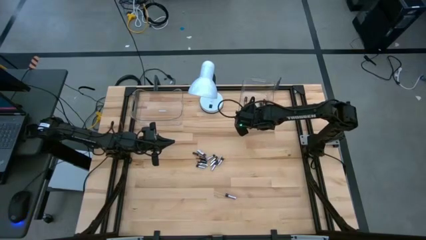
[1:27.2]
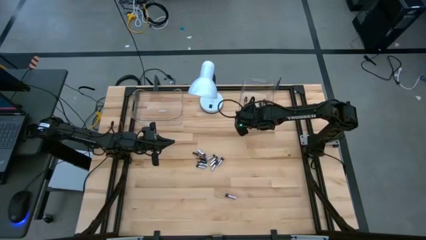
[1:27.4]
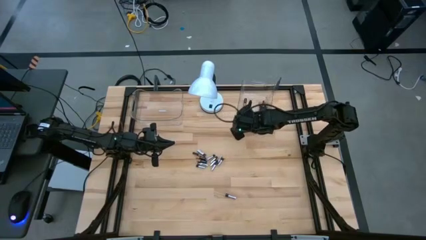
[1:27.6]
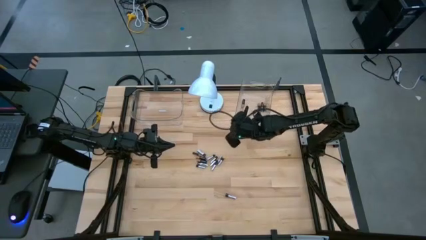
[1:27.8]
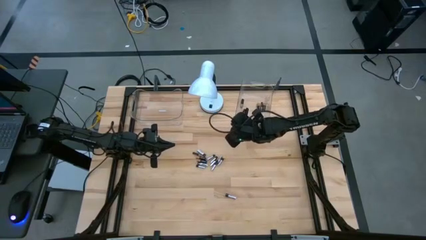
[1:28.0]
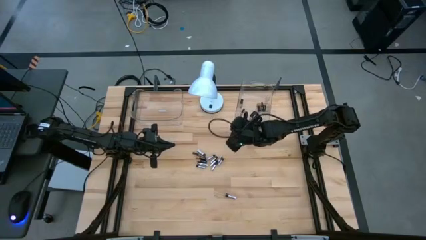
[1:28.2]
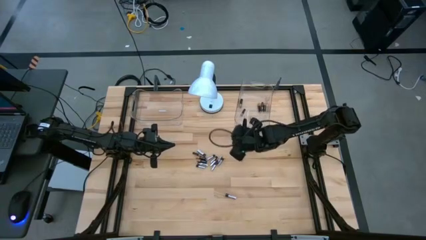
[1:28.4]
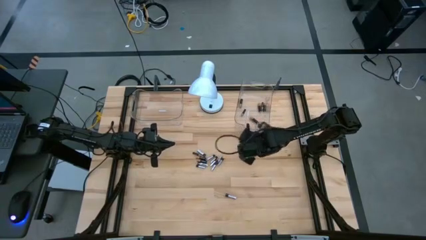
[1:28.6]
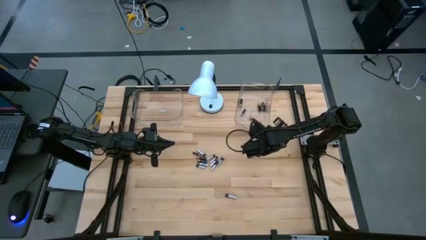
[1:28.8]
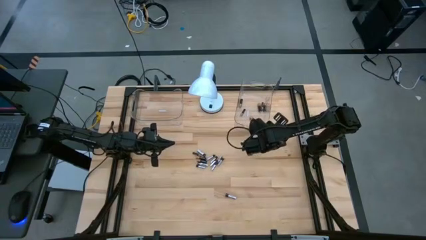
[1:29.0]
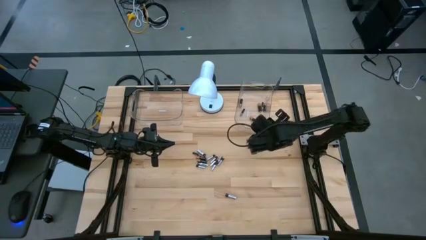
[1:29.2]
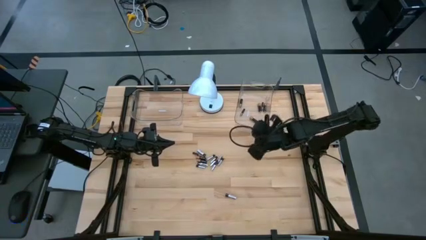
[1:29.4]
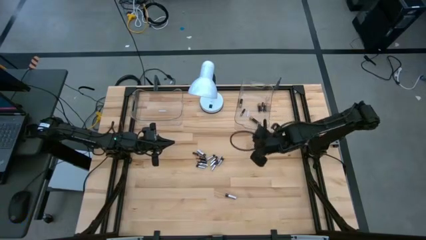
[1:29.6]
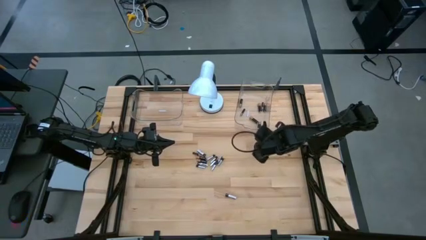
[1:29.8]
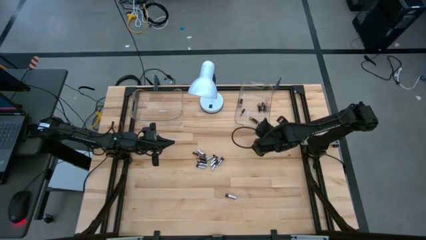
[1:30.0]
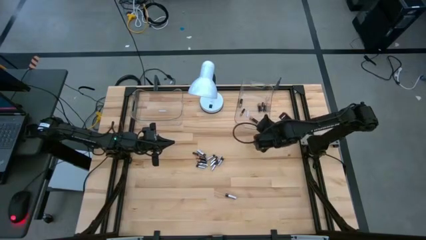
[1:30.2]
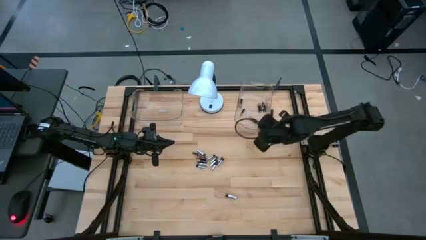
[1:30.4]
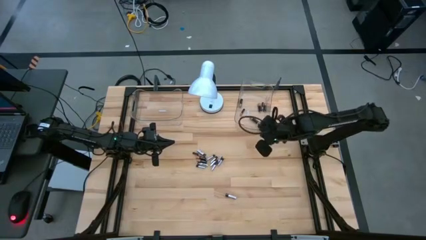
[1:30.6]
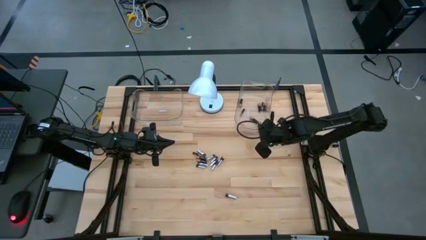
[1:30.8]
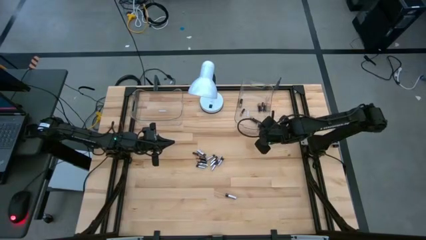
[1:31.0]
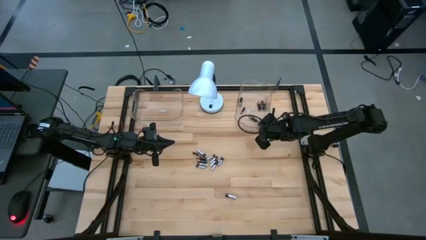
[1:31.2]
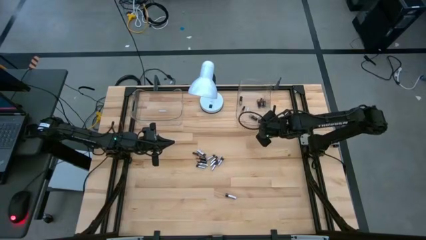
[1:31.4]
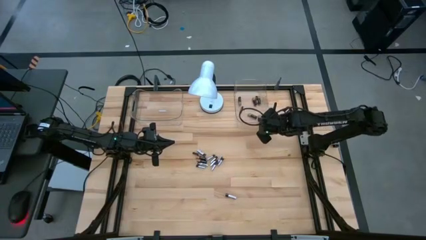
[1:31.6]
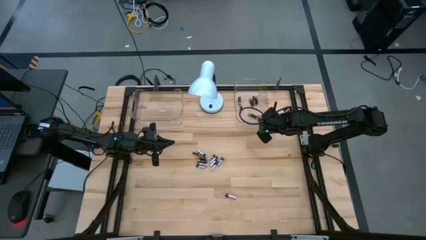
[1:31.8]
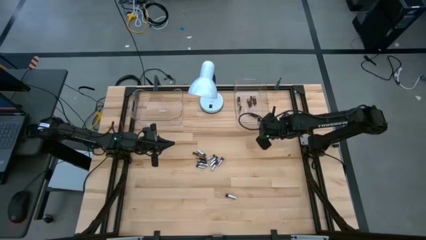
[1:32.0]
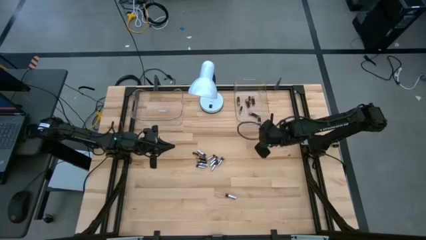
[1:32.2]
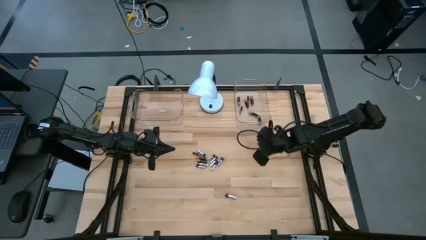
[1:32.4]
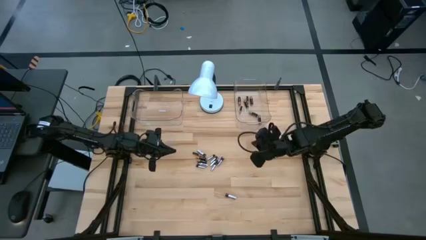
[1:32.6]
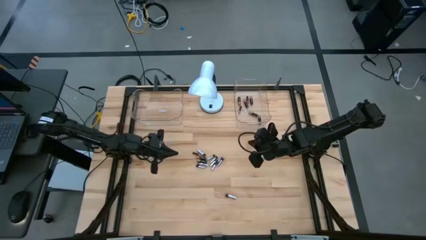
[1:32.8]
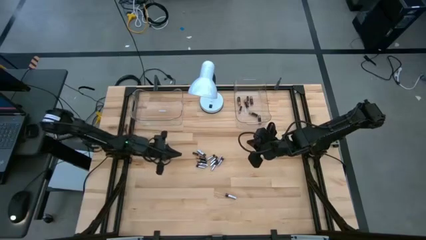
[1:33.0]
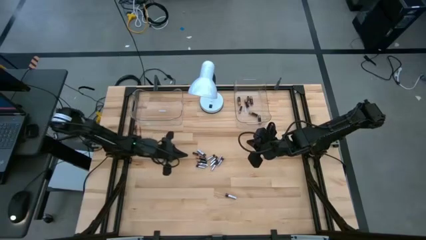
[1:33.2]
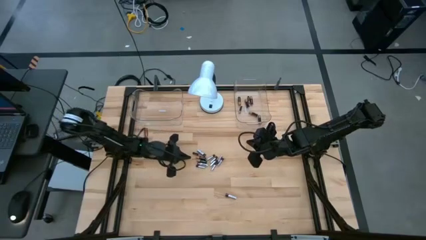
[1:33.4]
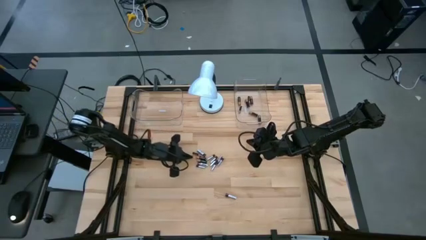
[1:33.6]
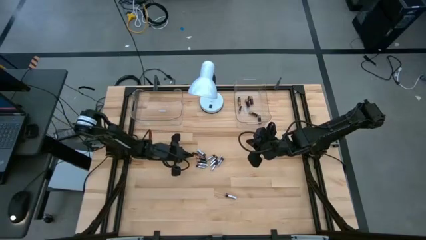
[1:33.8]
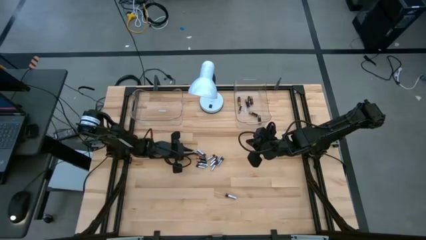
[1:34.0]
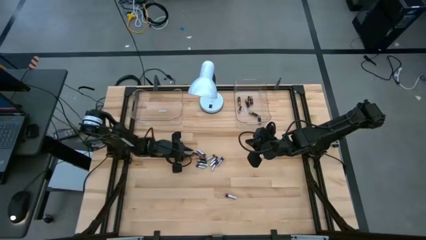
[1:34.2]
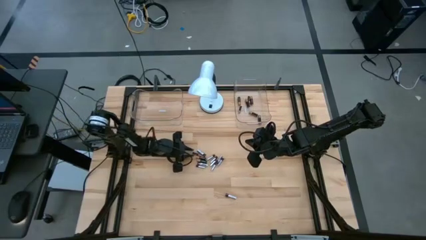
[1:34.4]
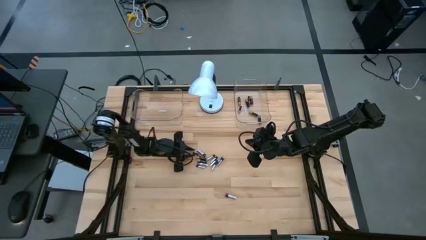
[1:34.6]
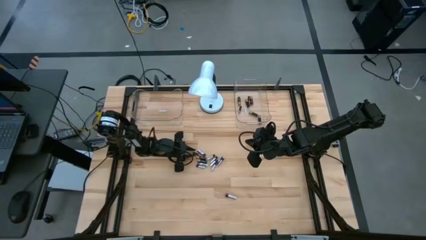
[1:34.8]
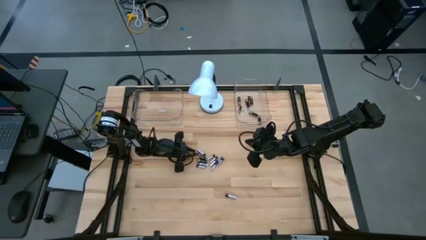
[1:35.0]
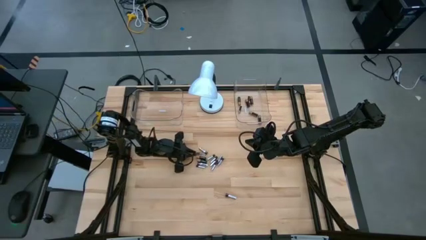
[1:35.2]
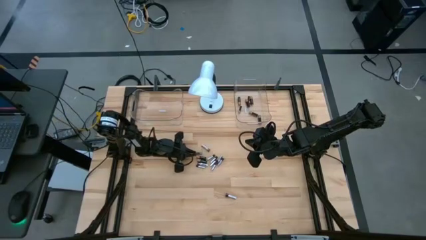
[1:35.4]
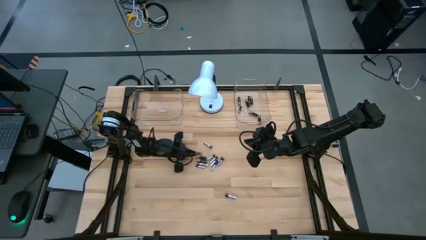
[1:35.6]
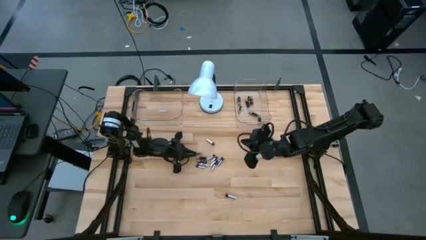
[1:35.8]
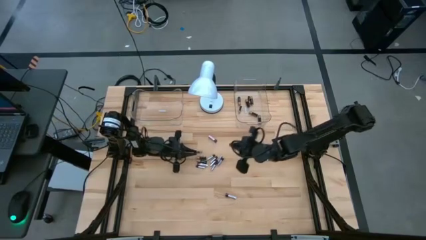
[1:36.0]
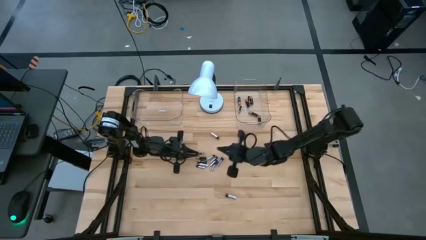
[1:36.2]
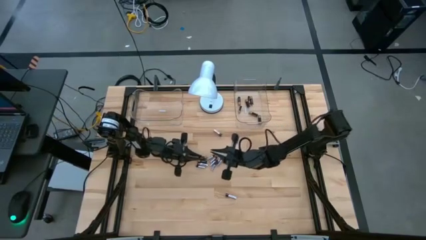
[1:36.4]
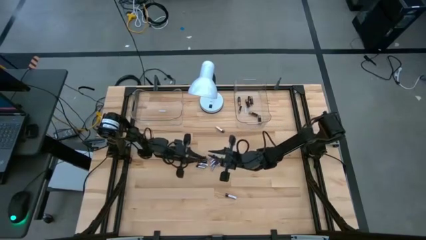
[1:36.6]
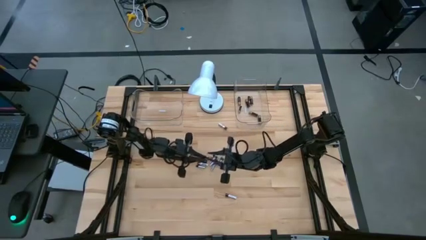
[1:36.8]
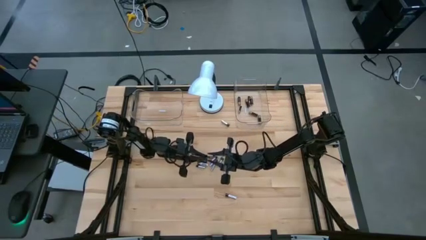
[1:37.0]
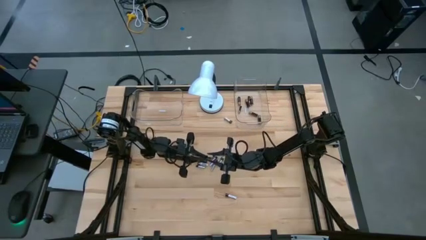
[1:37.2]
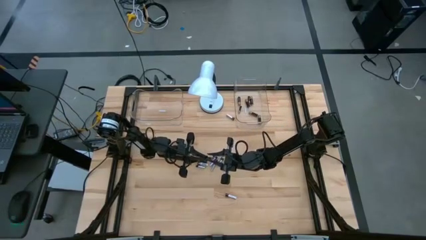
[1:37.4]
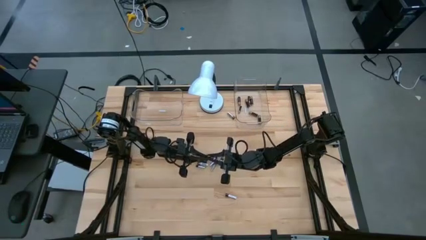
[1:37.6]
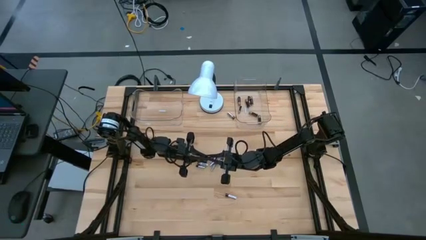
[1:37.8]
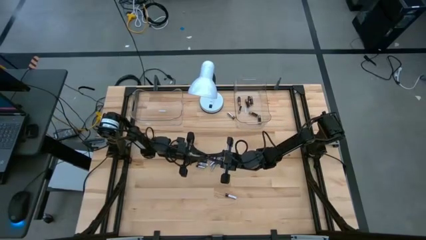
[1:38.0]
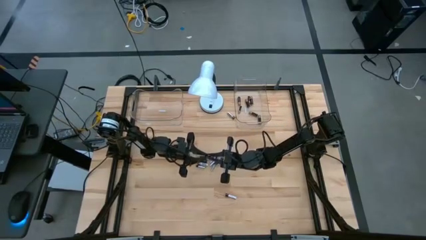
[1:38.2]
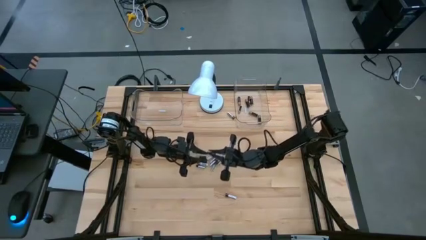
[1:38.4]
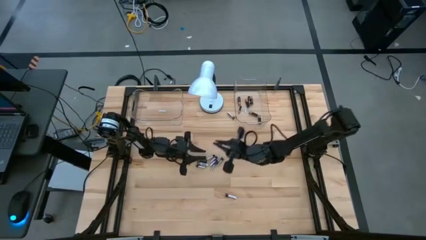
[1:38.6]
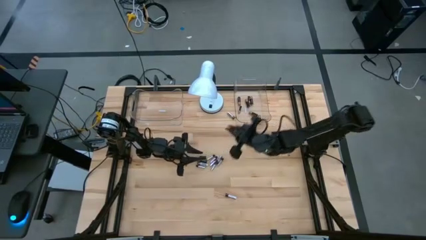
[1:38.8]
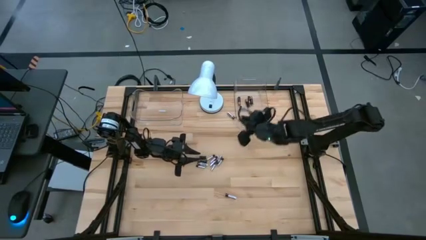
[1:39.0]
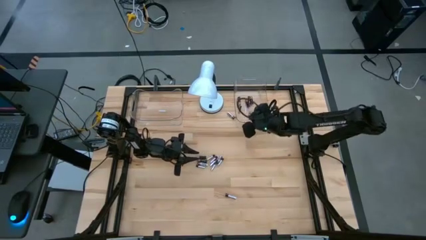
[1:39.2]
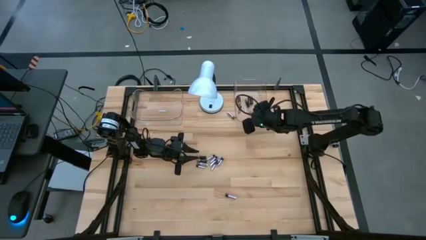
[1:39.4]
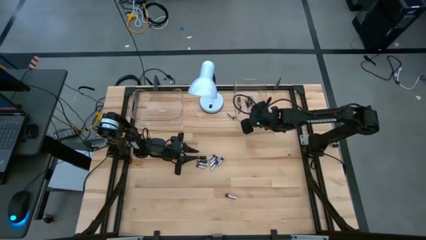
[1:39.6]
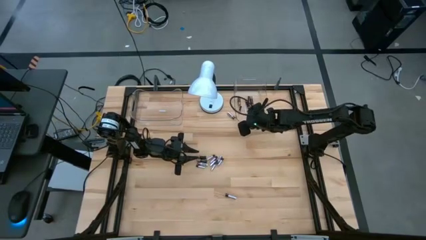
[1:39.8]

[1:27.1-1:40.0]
Task: Sort batteries
Put the black battery in the transparent bin

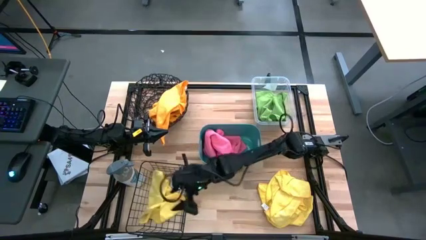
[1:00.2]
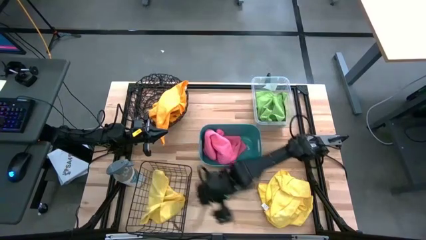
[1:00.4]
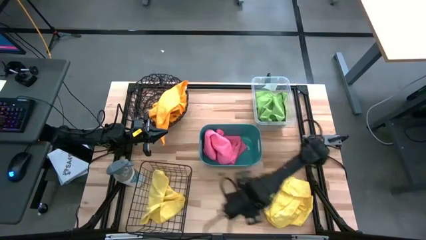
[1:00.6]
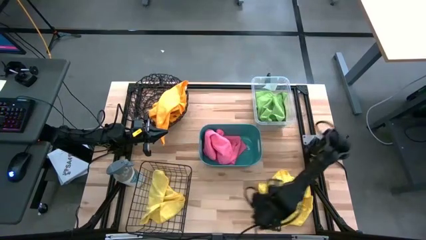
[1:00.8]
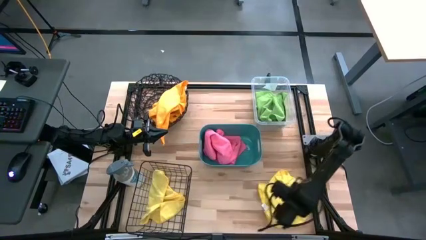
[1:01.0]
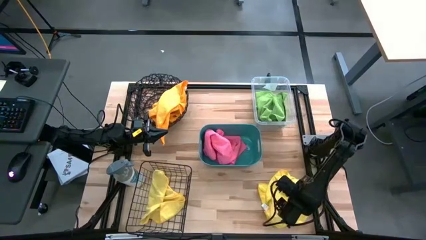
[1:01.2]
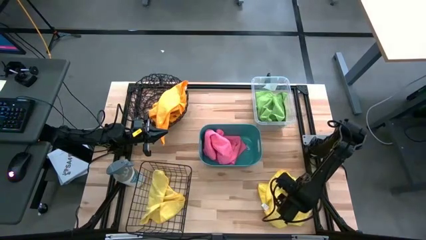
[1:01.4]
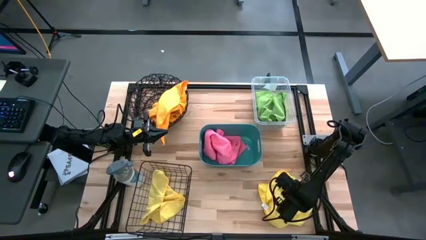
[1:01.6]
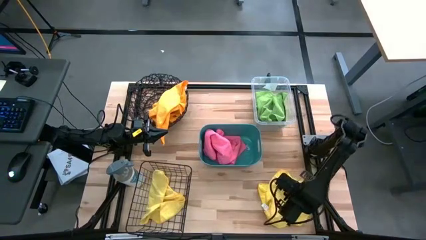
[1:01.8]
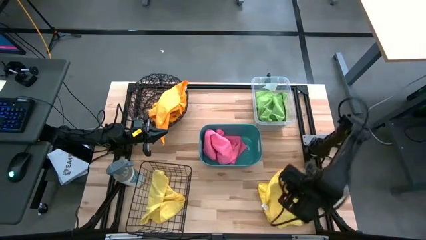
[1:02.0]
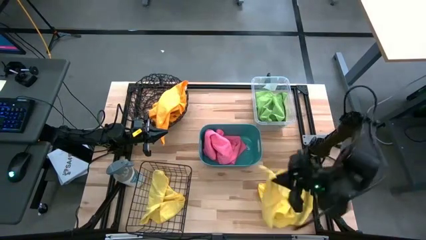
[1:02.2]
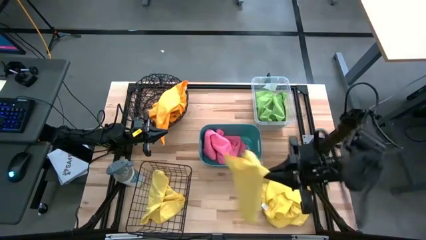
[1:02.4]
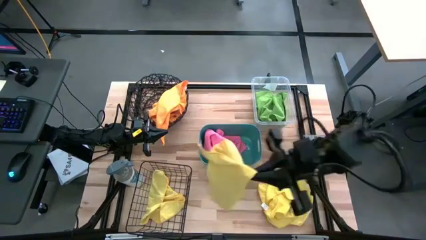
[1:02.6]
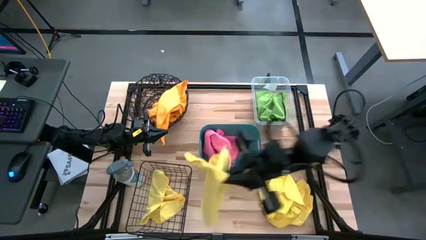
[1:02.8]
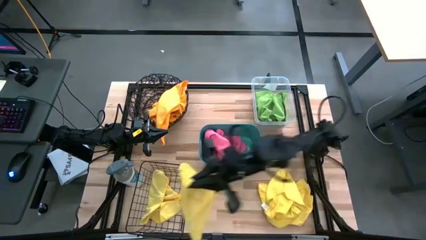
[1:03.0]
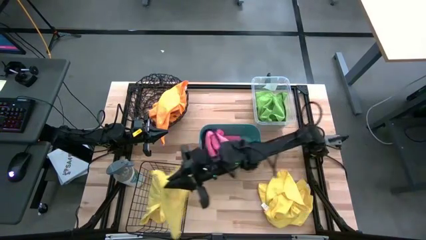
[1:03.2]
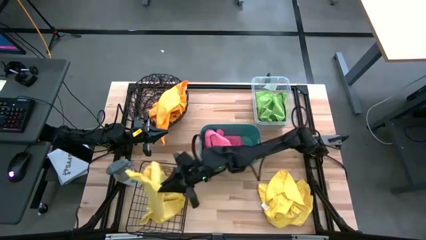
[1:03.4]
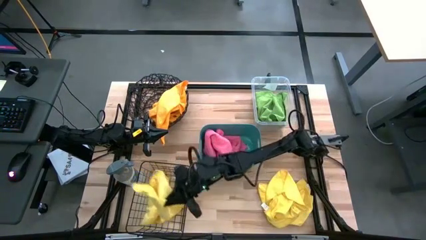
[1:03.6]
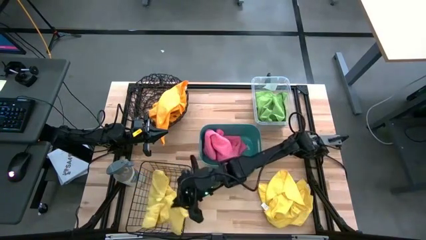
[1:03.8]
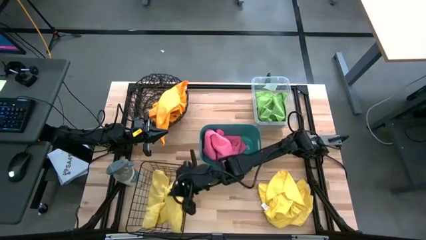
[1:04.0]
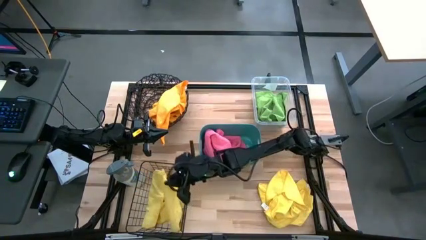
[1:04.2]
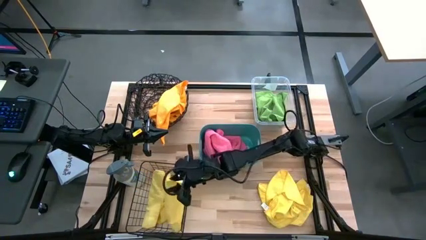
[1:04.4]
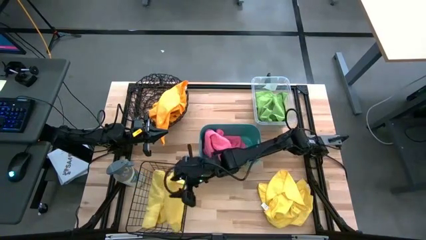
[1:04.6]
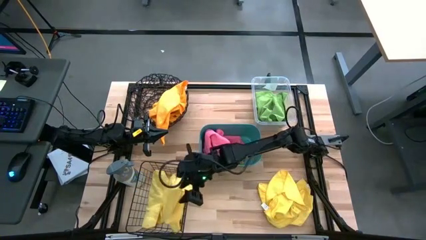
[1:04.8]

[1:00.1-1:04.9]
Task: Sort microfiber towel by color & place in baskets
Put the yellow microfiber cloth into the bottom black wire basket
